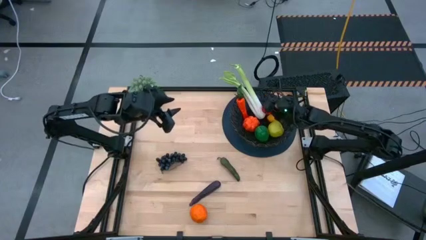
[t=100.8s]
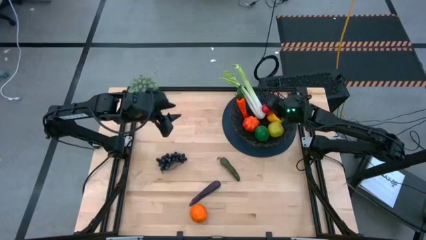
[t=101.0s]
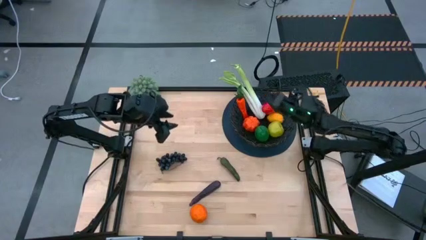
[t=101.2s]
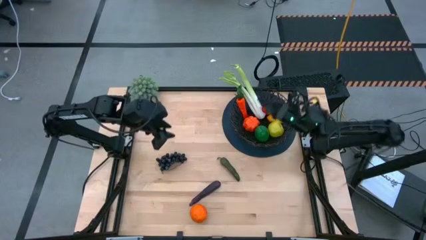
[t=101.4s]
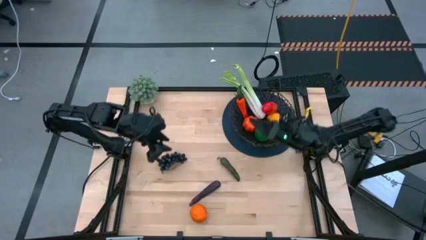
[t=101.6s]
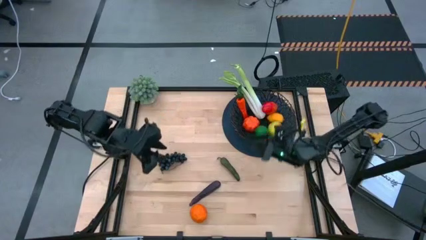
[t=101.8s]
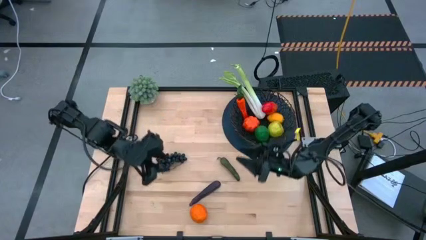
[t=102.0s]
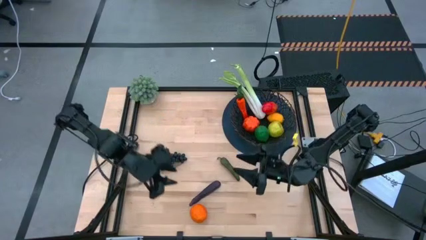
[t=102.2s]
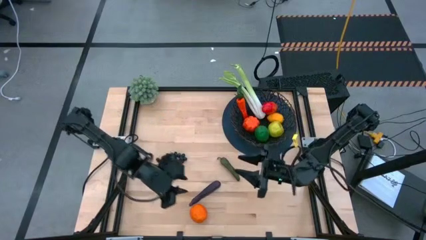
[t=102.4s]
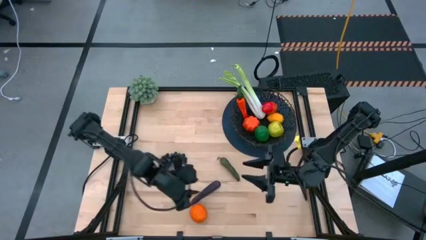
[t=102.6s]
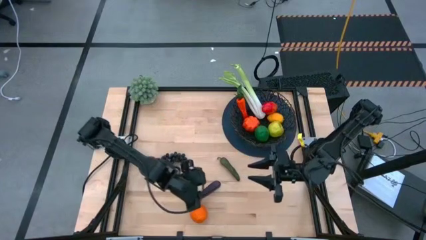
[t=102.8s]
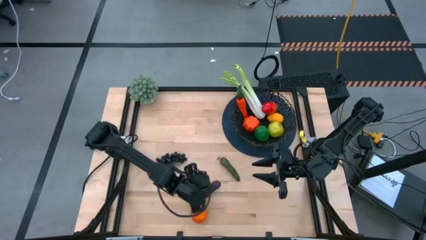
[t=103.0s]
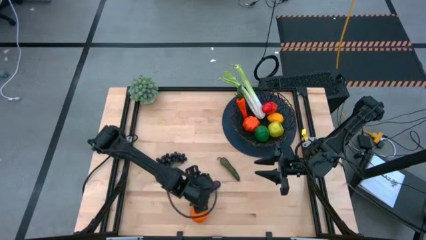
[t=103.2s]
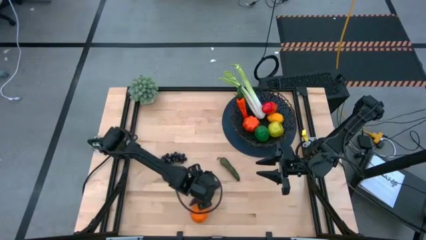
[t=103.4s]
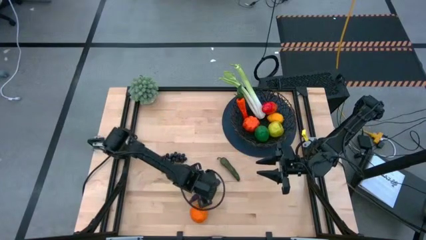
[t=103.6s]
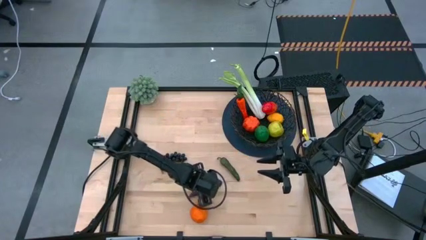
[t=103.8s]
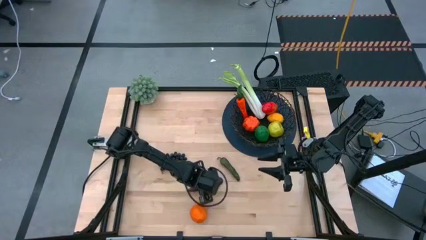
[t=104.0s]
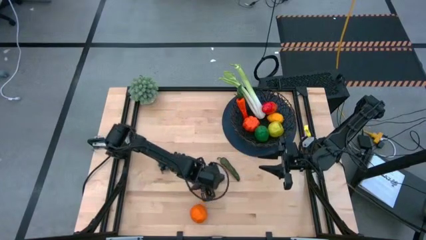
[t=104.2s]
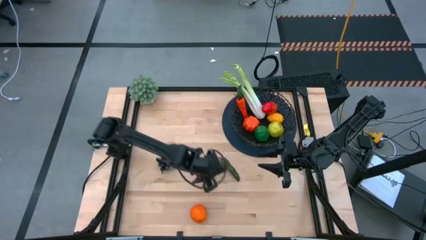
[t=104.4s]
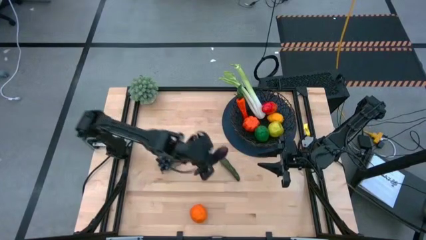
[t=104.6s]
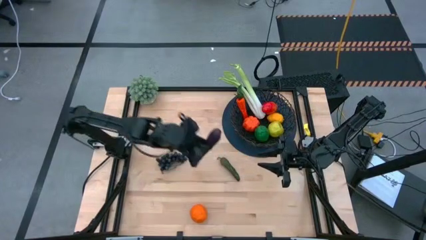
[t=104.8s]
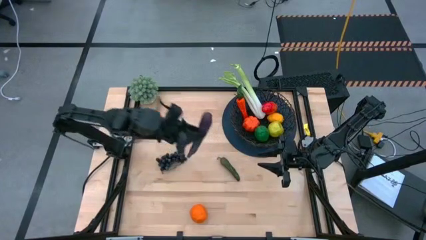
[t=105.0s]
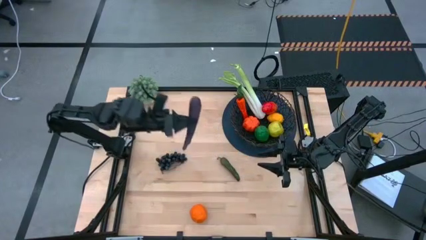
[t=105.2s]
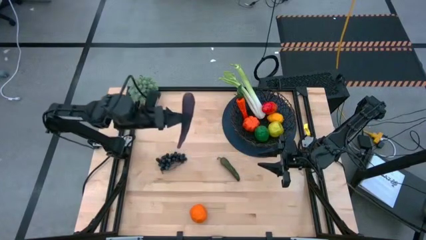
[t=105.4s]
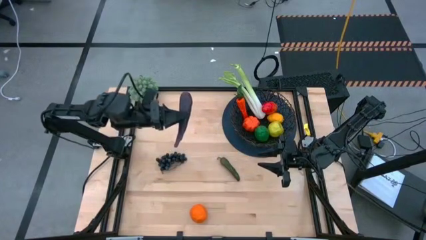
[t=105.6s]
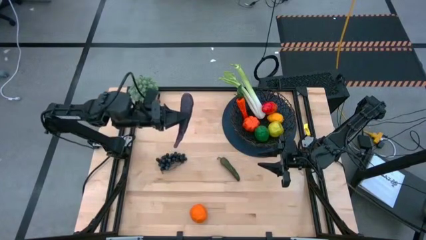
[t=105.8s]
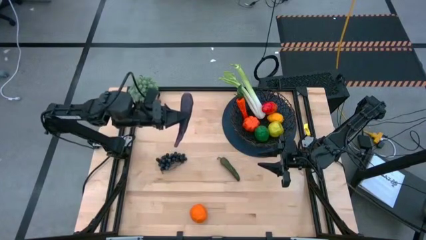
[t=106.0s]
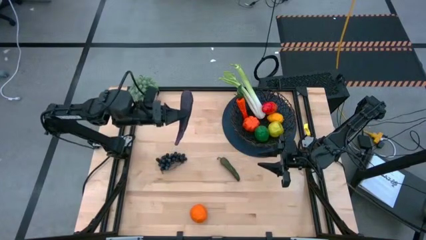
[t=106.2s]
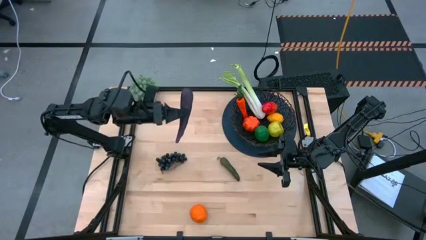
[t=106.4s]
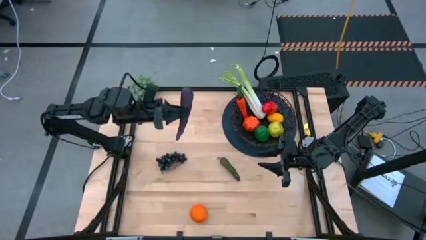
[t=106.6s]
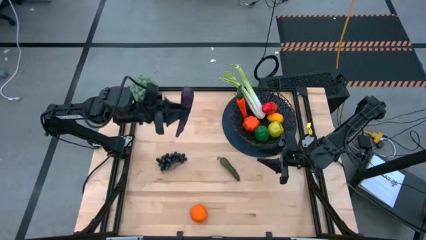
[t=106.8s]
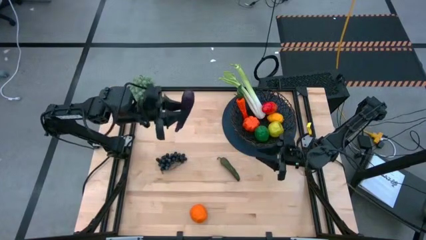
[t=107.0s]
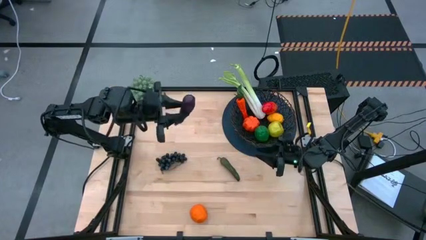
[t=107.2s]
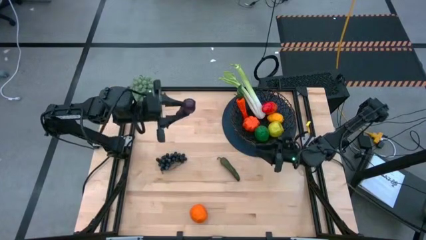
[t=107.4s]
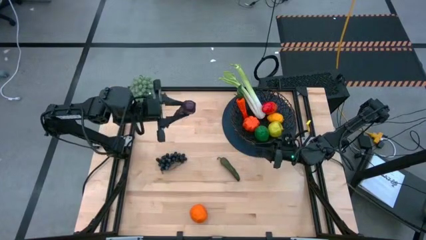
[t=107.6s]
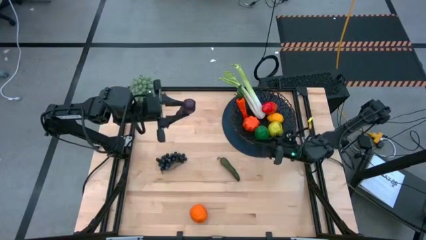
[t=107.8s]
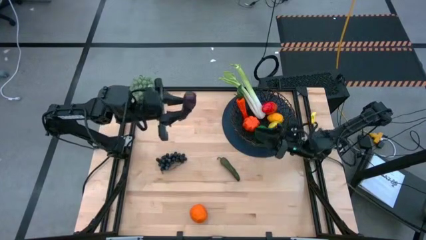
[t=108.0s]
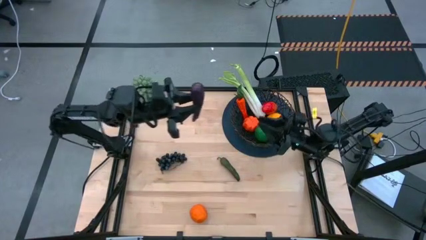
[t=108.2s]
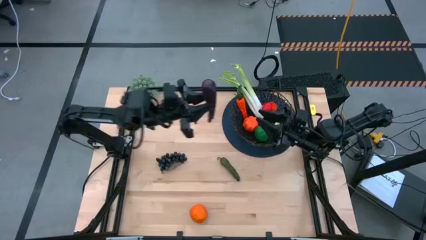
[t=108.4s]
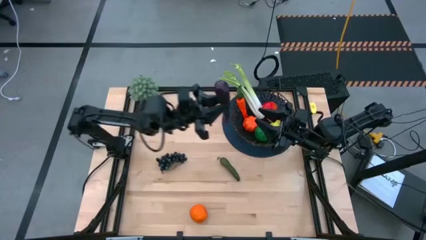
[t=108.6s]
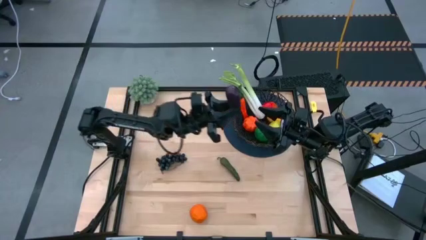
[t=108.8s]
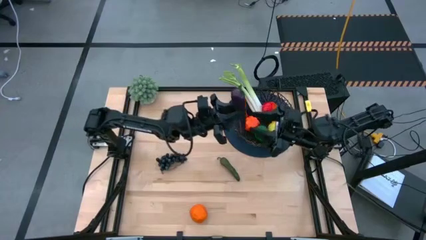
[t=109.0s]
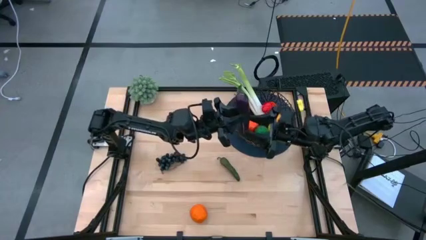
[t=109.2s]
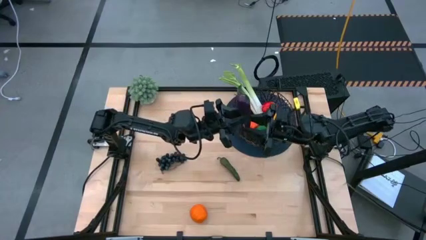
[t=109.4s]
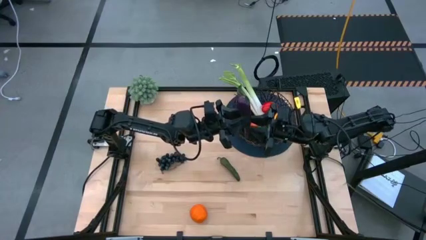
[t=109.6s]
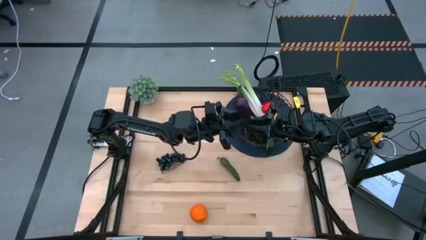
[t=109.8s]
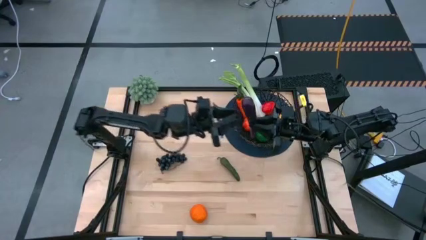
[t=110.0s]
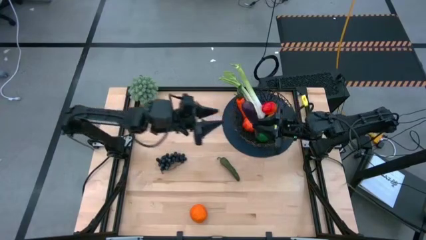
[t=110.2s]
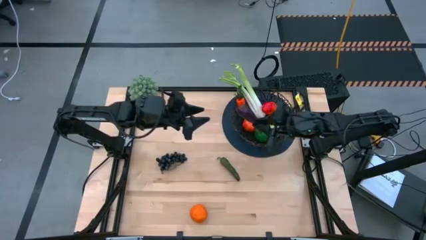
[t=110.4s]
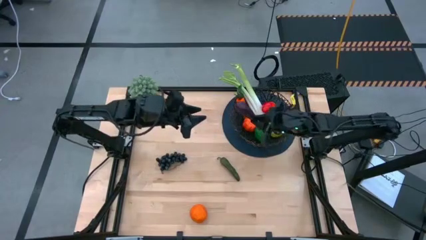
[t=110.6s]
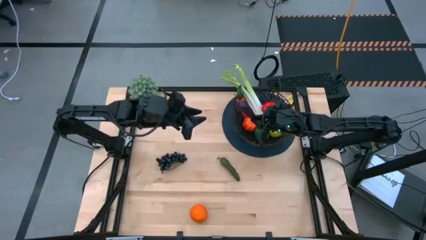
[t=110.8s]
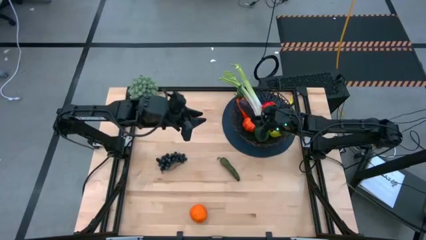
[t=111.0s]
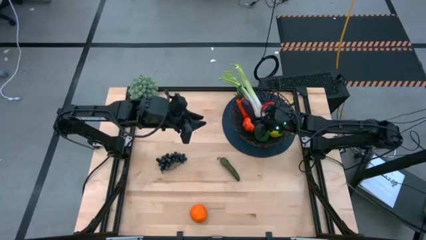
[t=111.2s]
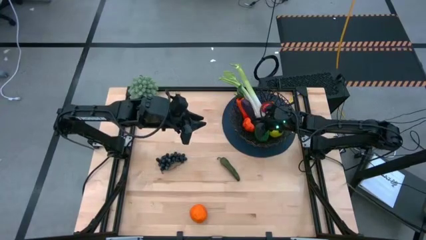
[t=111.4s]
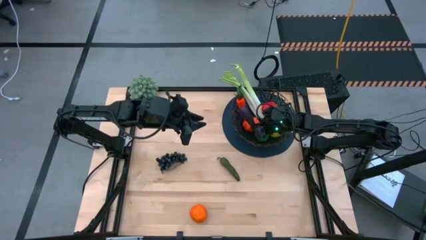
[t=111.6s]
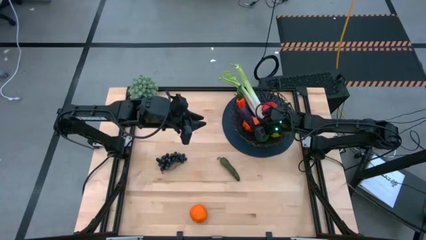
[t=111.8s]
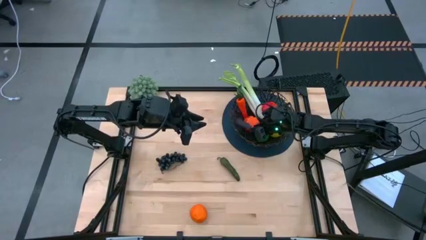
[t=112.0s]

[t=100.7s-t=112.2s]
Task: Build produce basket
Put the purple eggplant into the black woven basket
